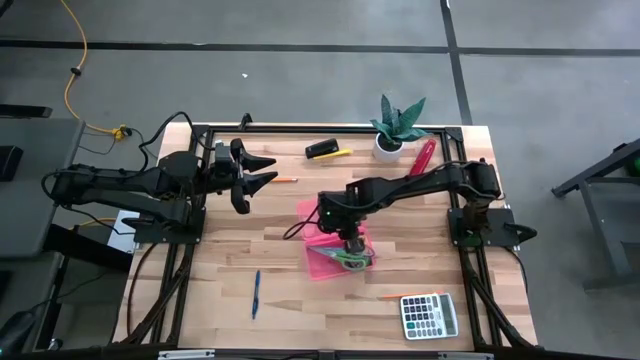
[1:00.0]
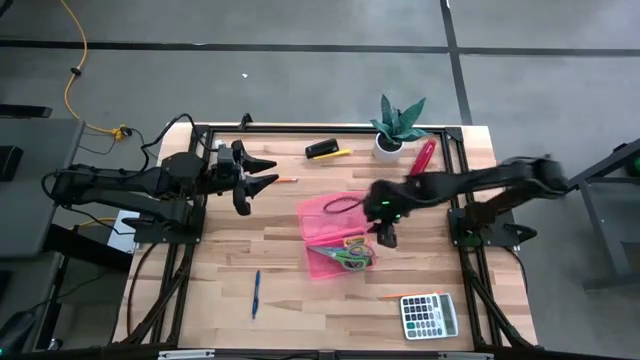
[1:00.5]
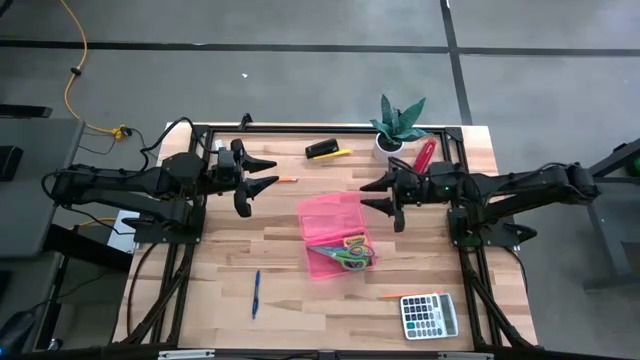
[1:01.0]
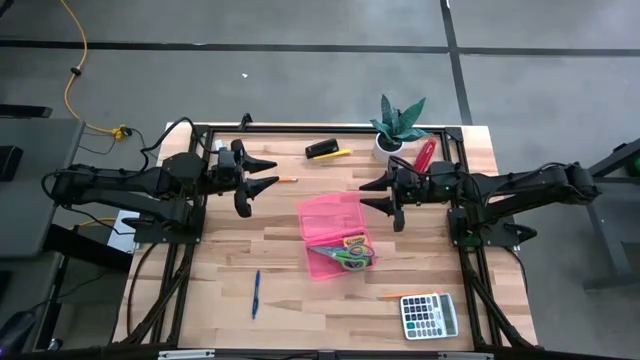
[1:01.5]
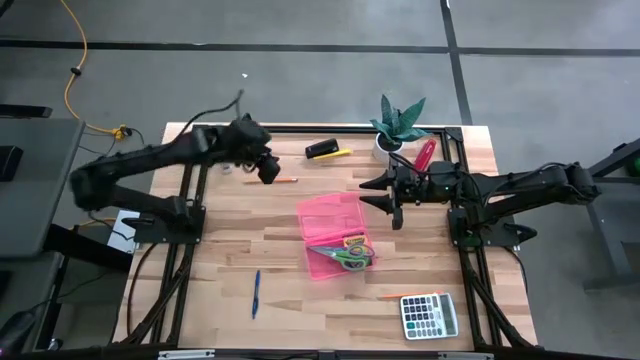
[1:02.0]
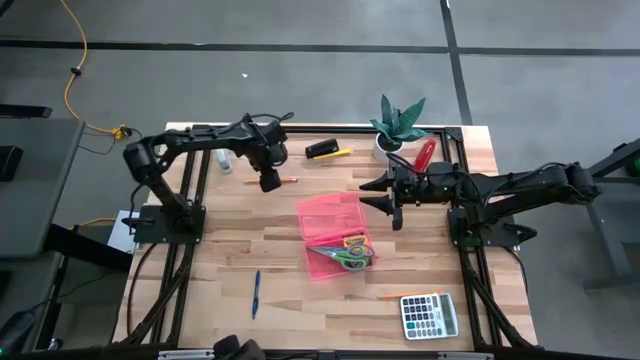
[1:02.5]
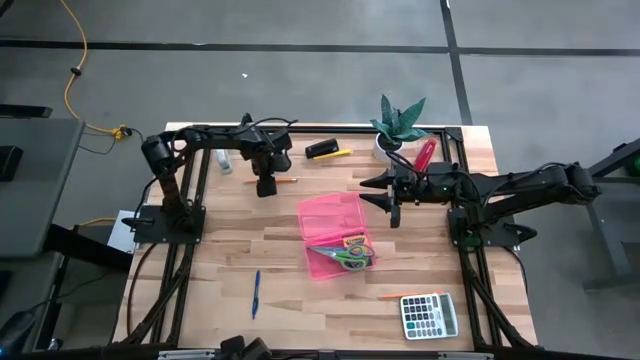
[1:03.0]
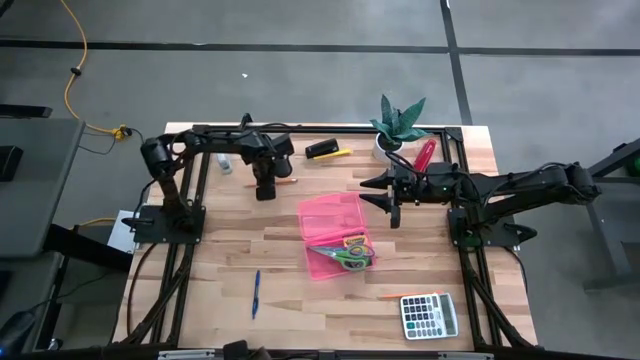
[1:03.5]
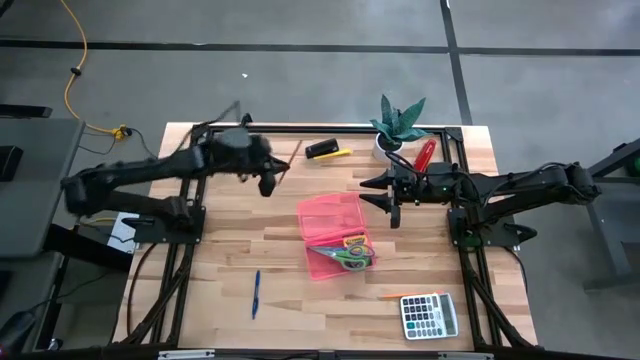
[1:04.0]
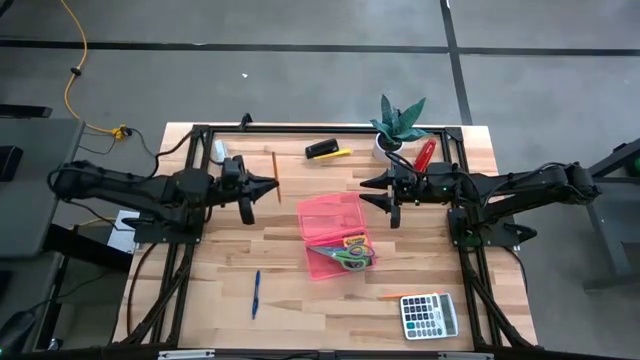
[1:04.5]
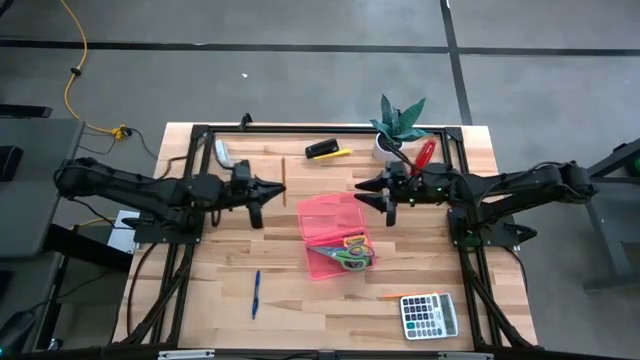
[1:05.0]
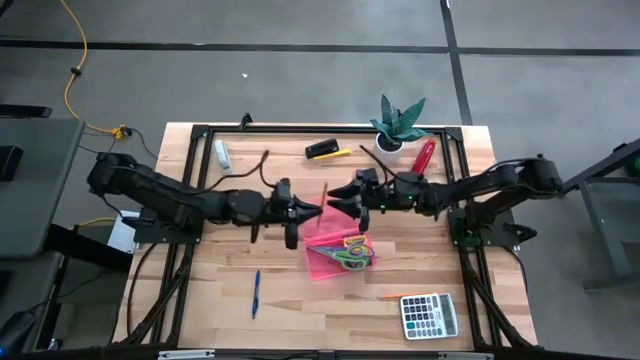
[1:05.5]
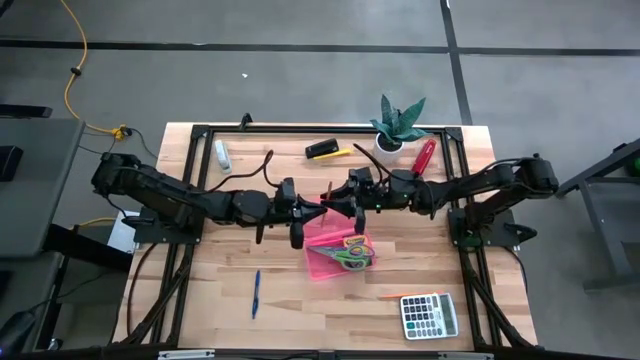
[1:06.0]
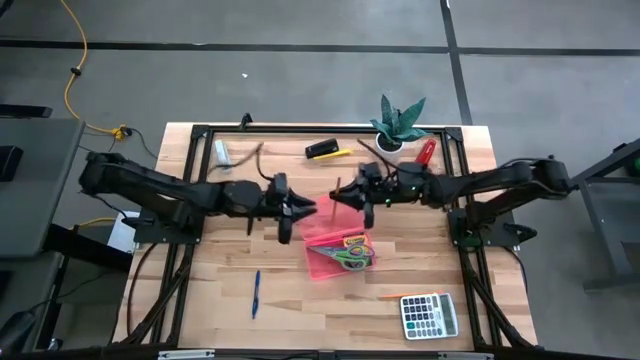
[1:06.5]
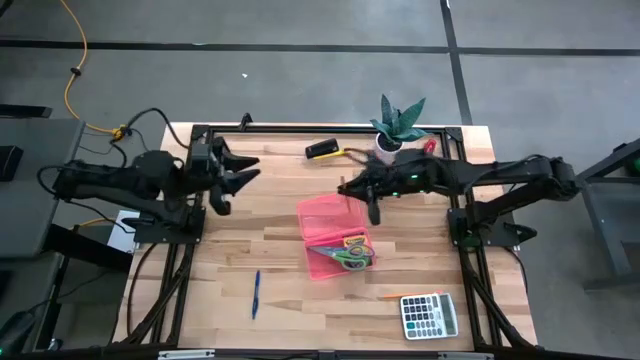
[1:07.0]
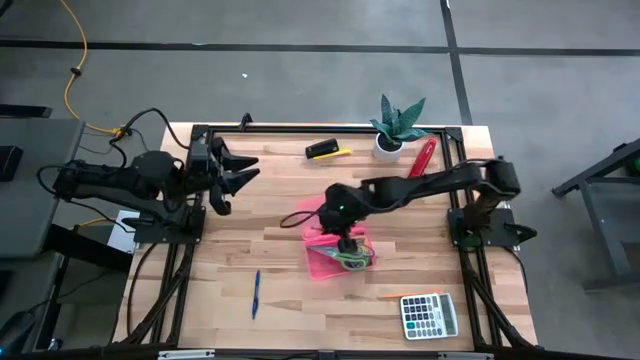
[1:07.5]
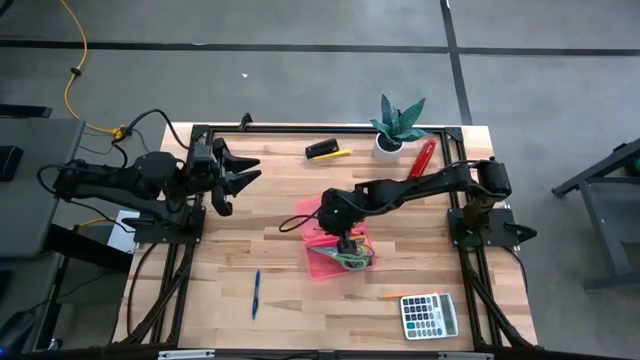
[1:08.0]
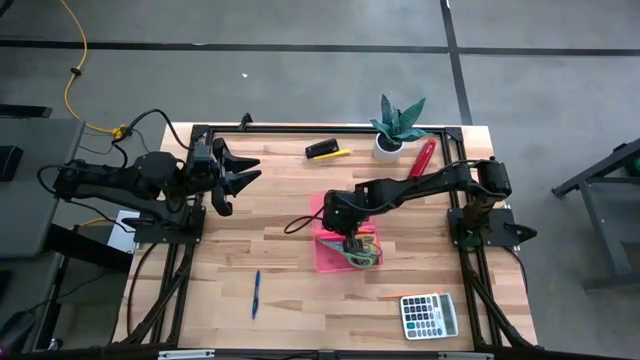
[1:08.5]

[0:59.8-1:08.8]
Task: Pack school essentials
Put the top orange pencil into the pink supply box

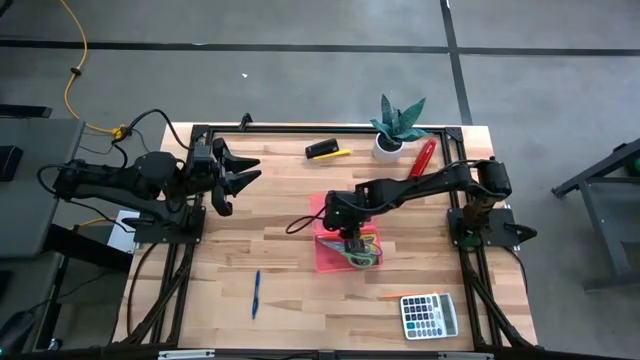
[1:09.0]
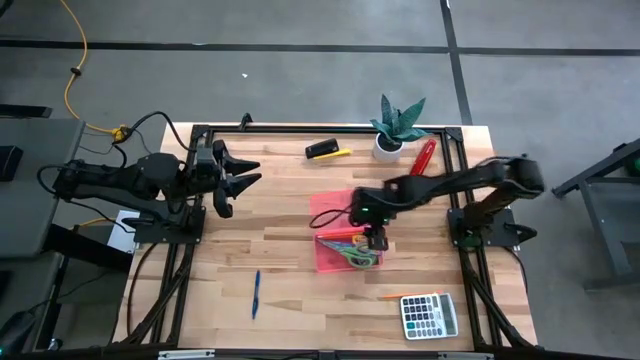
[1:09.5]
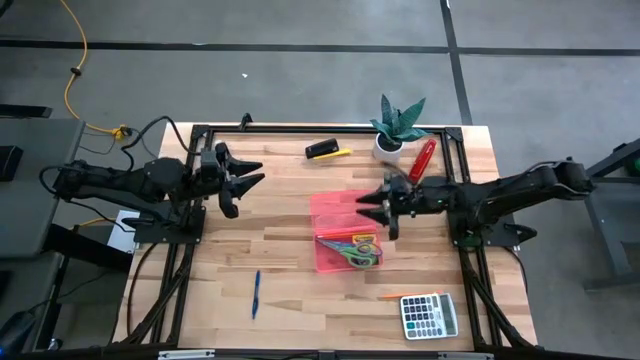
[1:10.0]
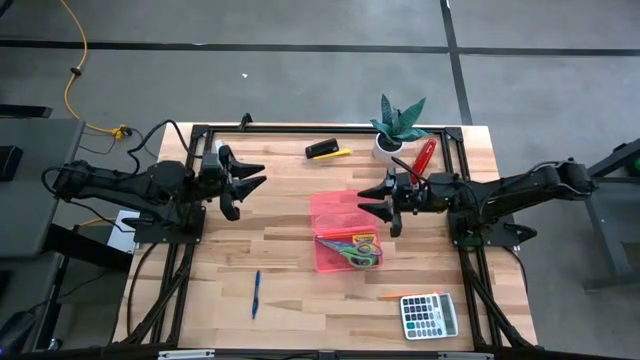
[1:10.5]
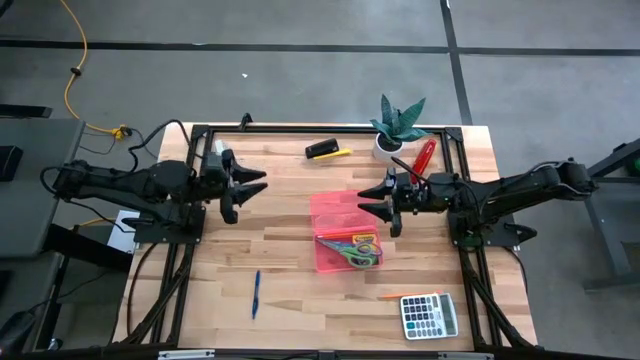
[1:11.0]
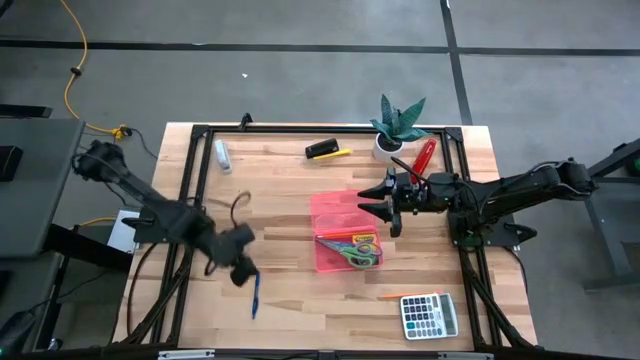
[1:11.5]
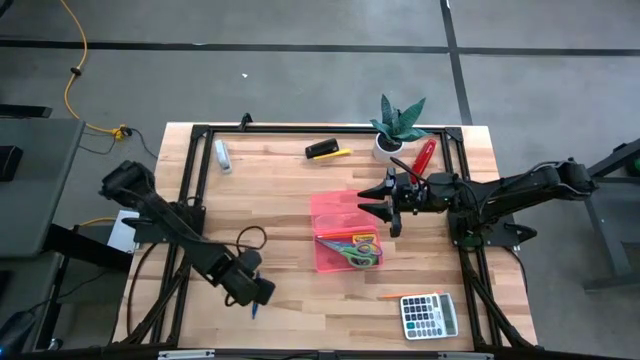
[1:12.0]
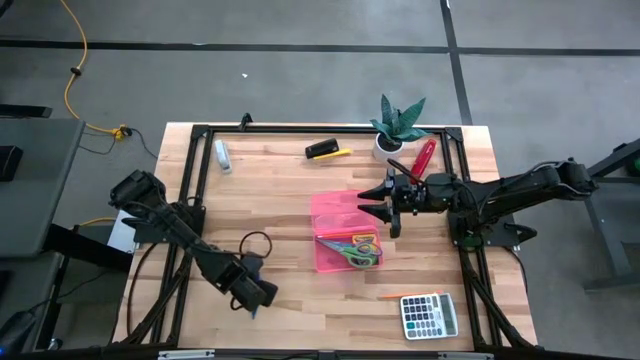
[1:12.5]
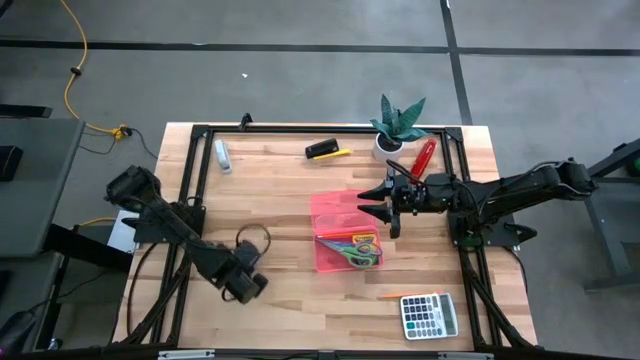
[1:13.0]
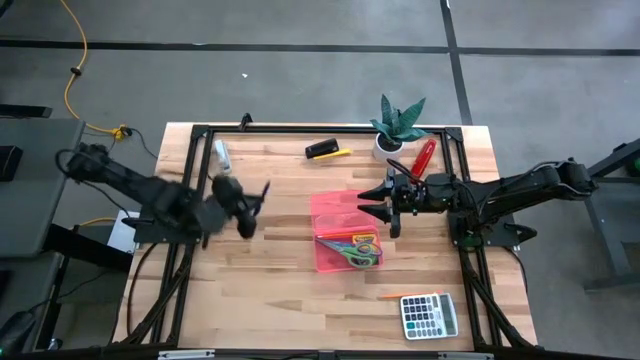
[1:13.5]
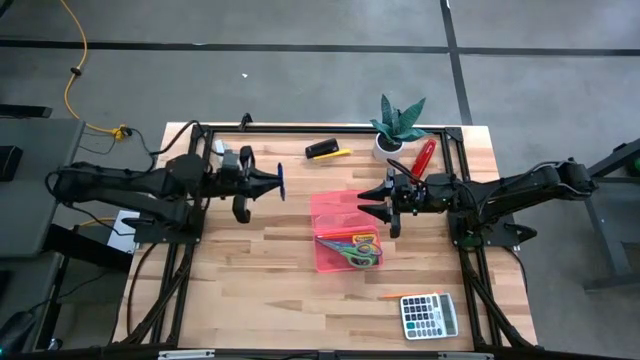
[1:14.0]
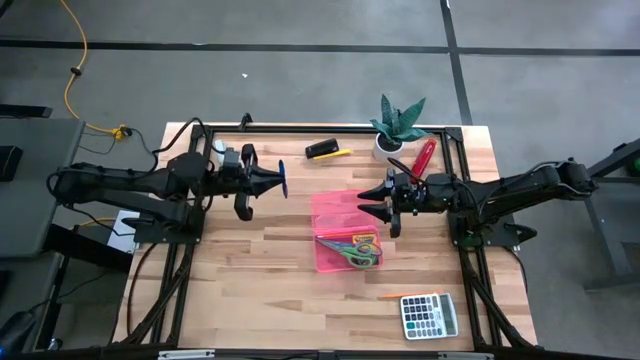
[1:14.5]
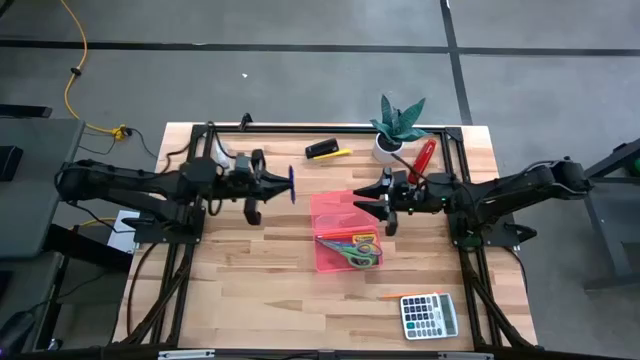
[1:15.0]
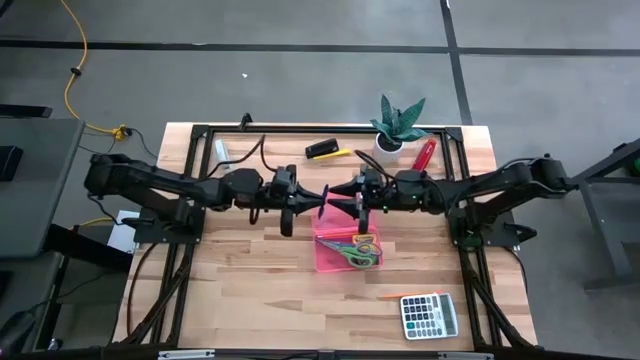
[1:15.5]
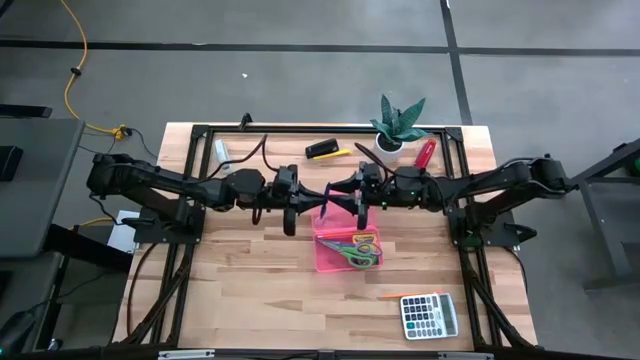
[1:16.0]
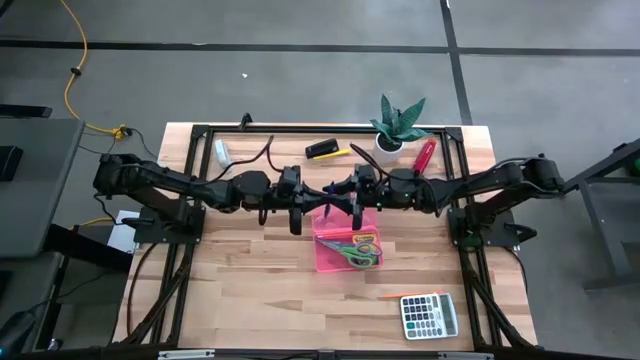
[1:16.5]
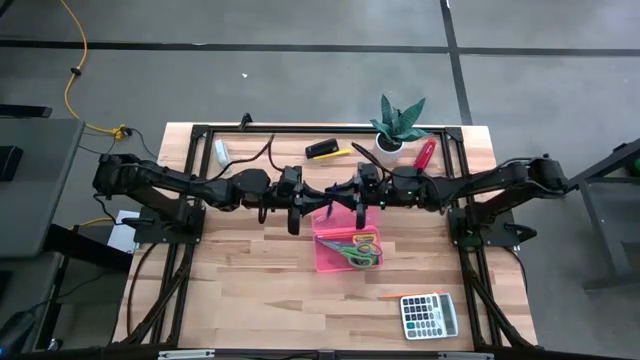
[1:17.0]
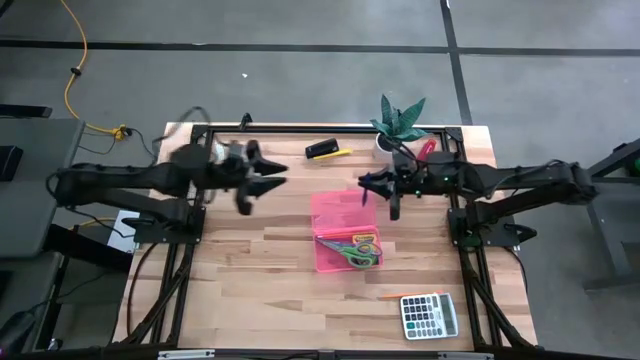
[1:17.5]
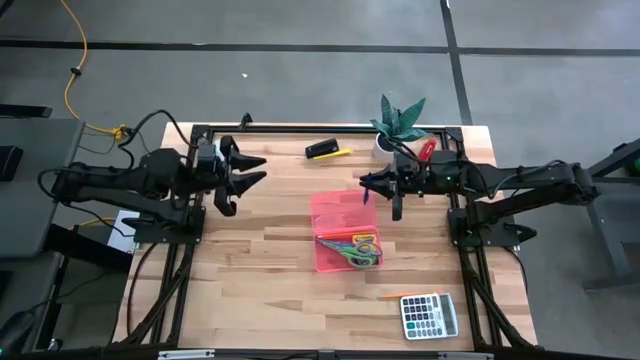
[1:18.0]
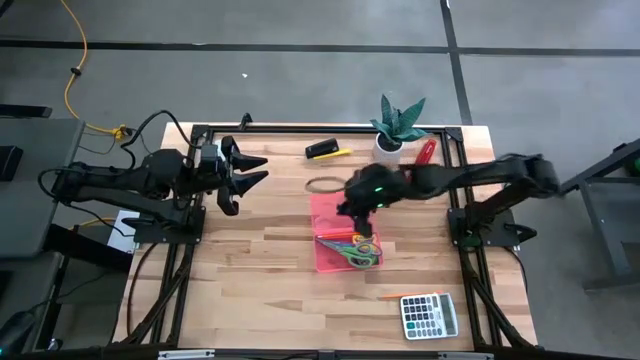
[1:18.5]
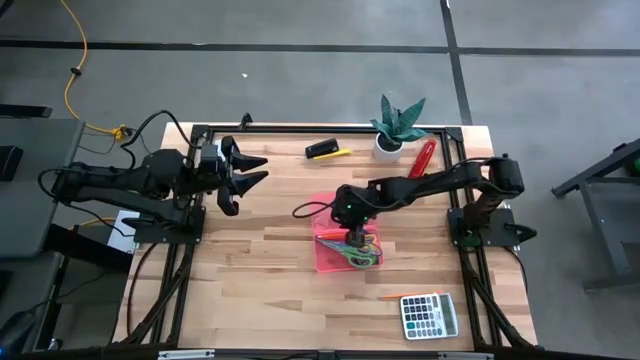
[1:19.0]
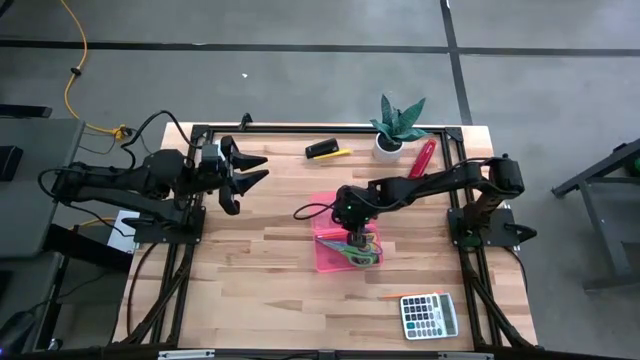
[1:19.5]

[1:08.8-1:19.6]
Put the blue pen into the pink supply box

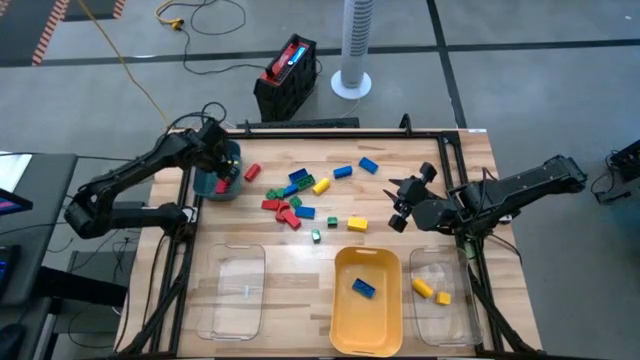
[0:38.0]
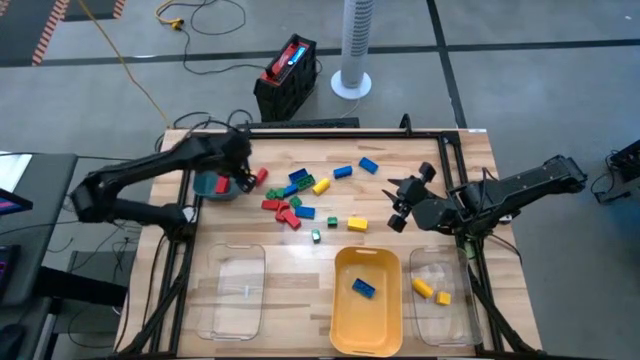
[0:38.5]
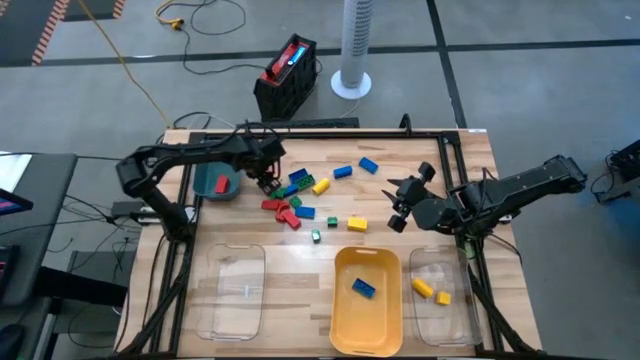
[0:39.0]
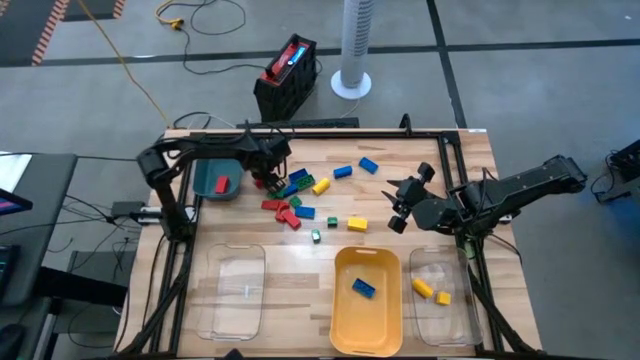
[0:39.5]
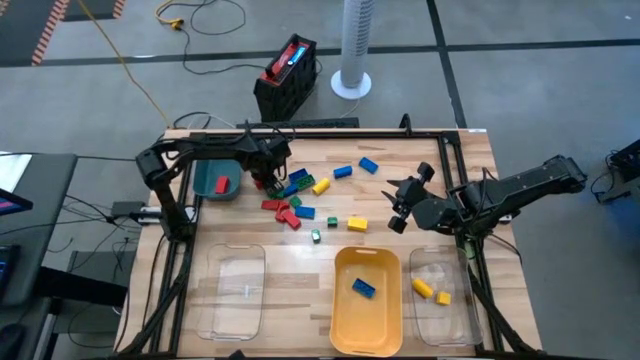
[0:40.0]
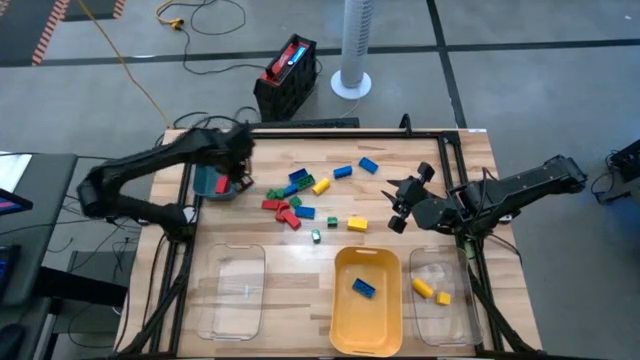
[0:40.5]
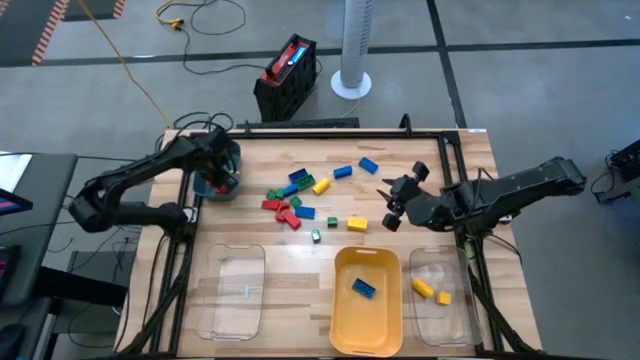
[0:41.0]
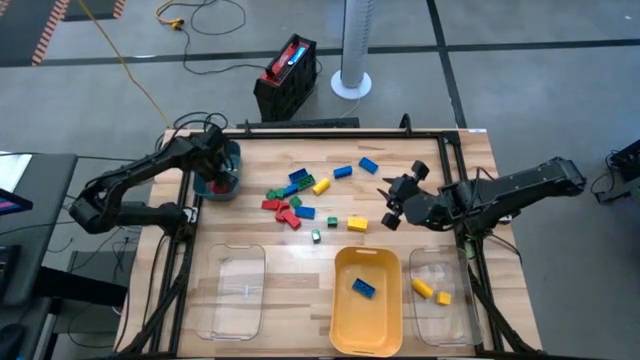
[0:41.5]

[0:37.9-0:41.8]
Task: Sort blocks
Put the red wooden block into the green bin
